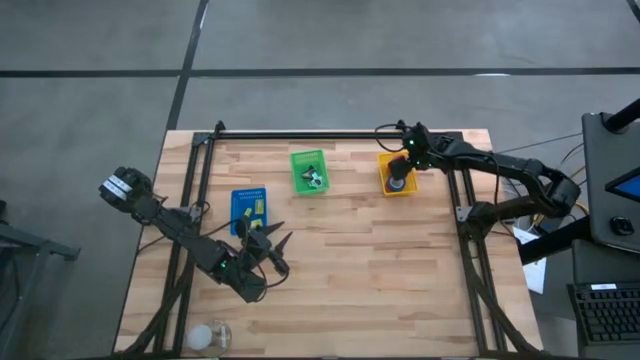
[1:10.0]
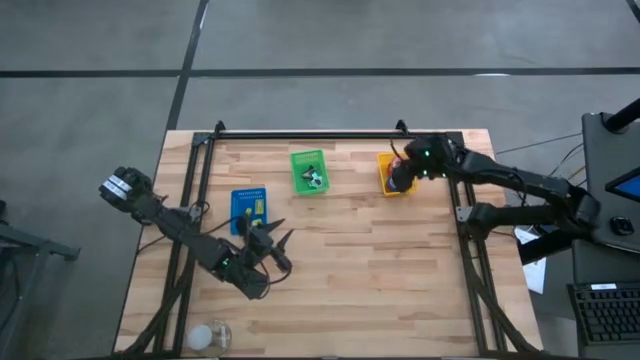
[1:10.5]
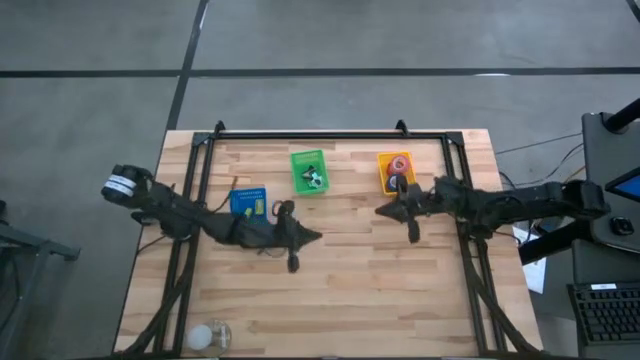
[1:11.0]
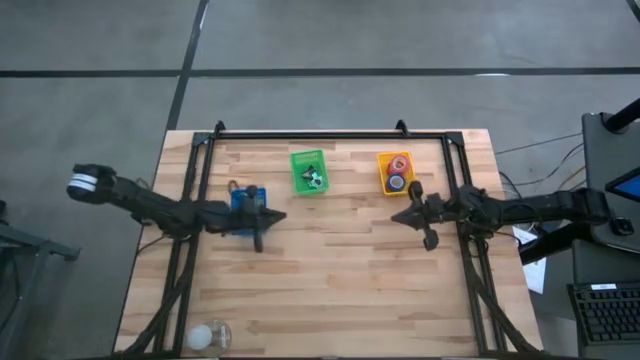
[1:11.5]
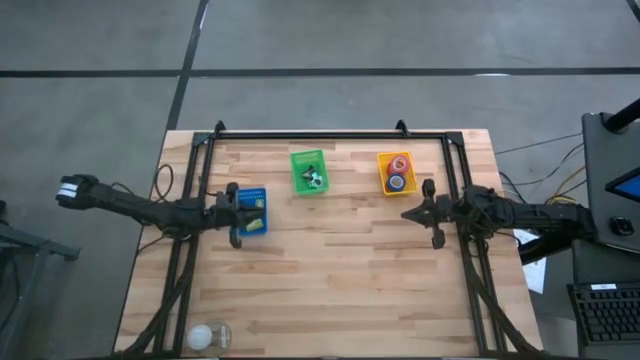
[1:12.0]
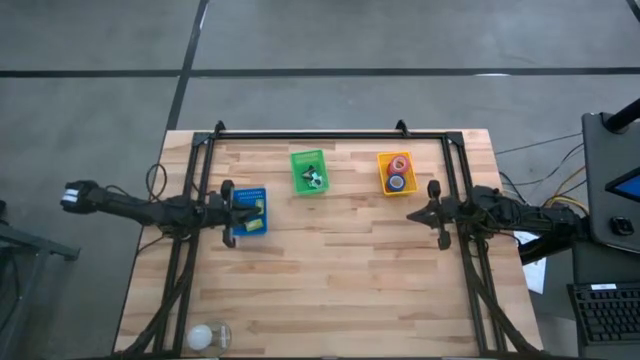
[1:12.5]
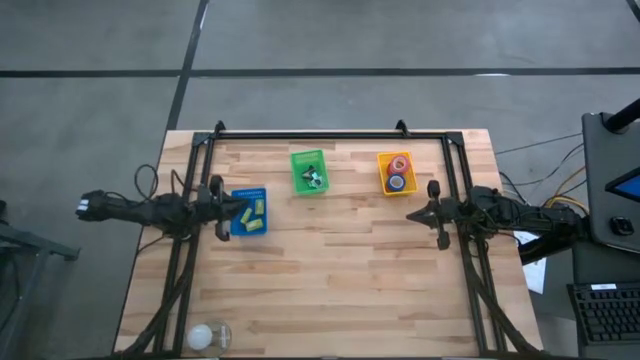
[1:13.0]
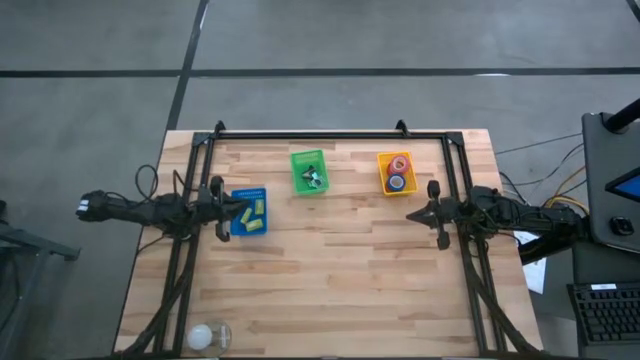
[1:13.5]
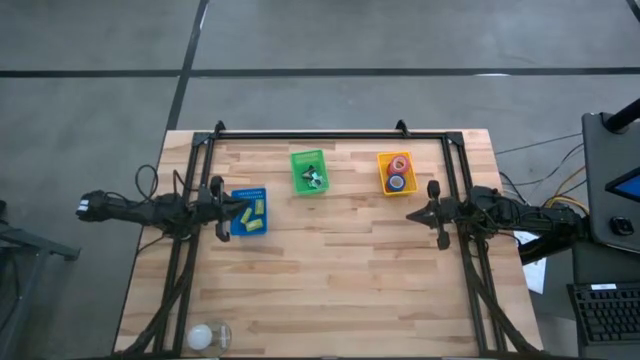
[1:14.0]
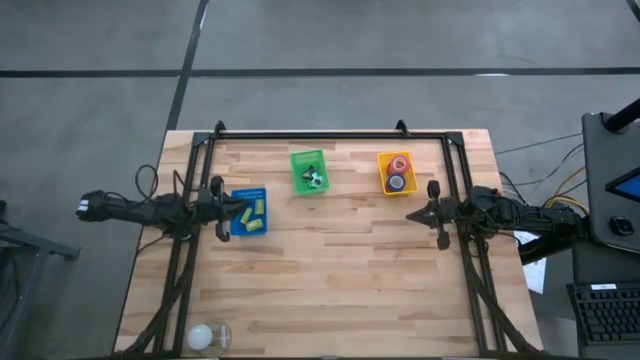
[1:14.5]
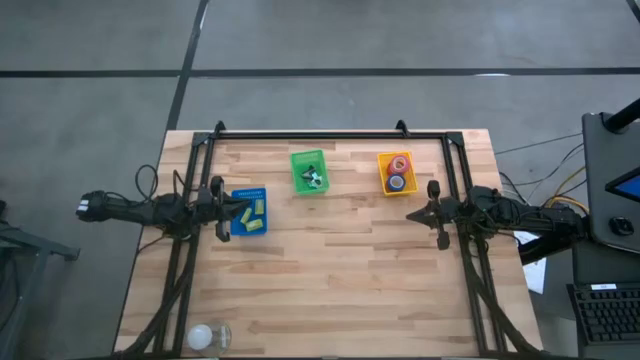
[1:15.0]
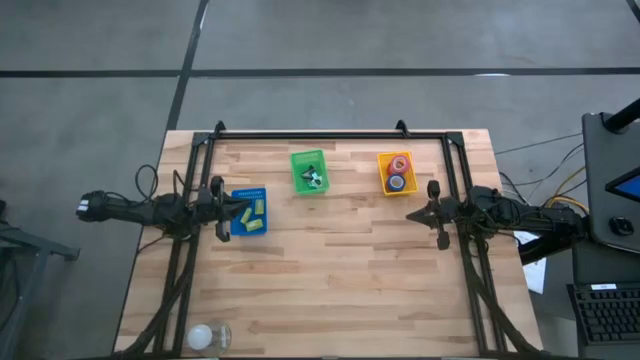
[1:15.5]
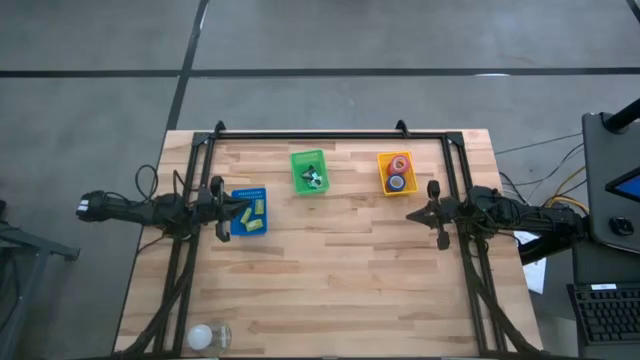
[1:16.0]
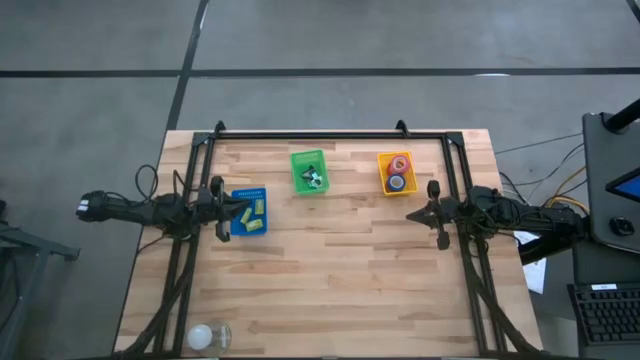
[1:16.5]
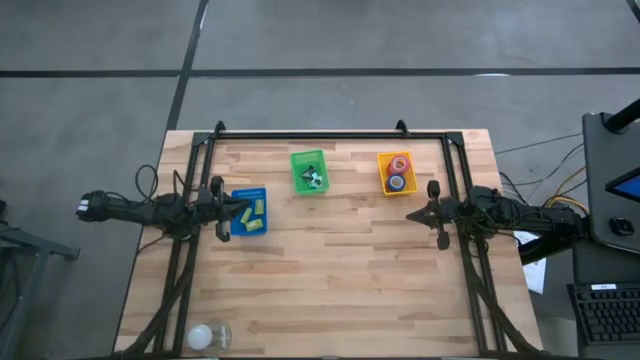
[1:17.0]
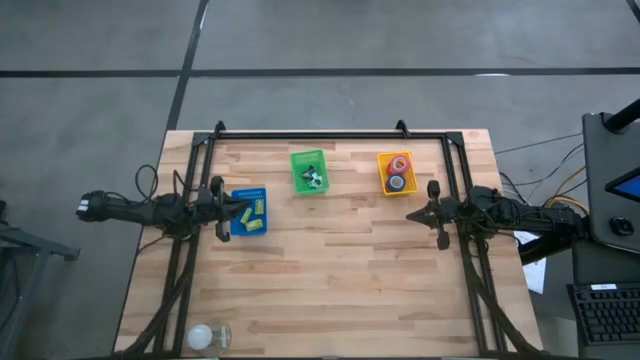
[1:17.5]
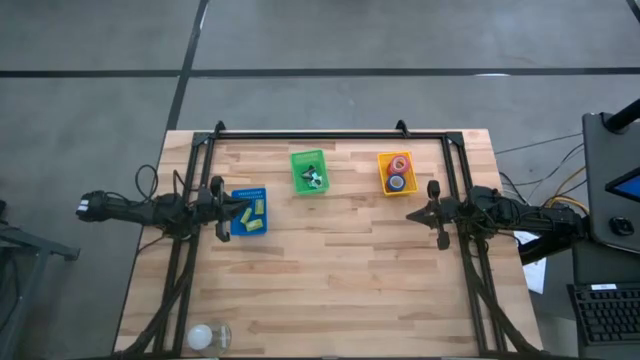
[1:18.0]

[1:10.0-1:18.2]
Task: Pick and place Stapler, Stapler remover, tape
Return to Home Position

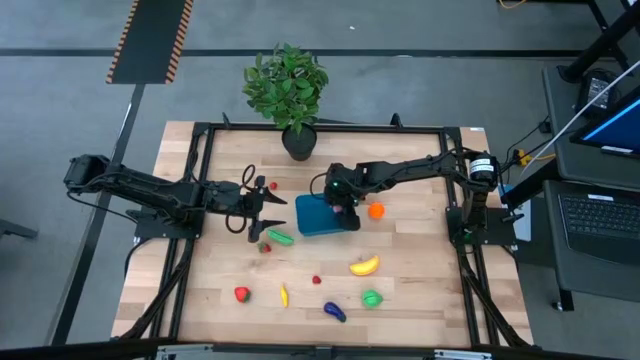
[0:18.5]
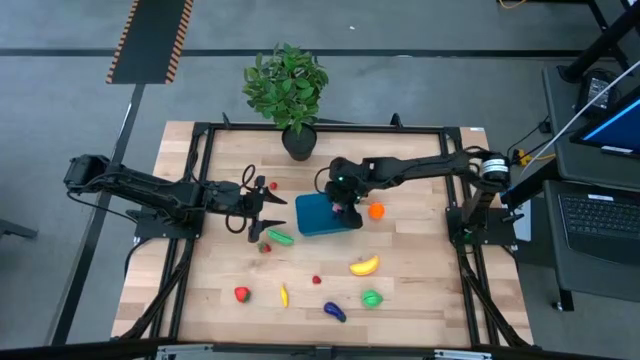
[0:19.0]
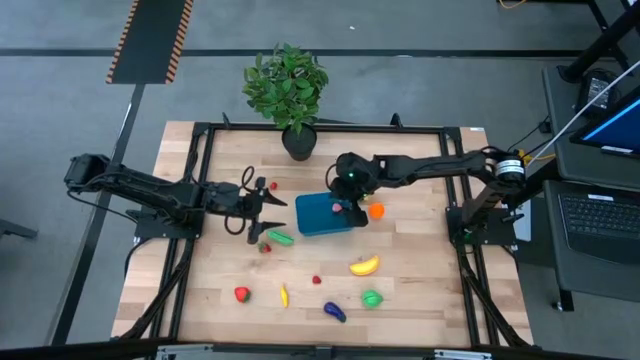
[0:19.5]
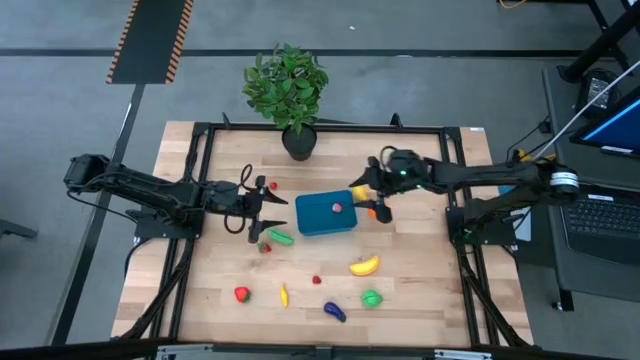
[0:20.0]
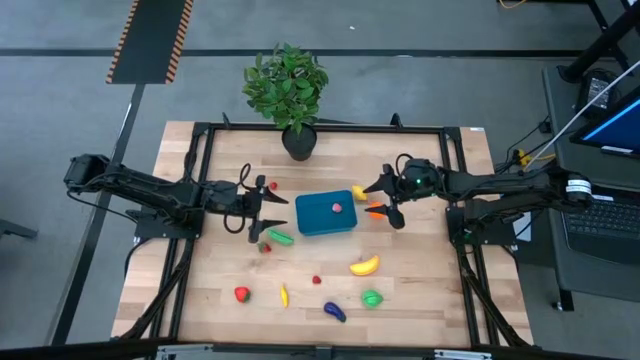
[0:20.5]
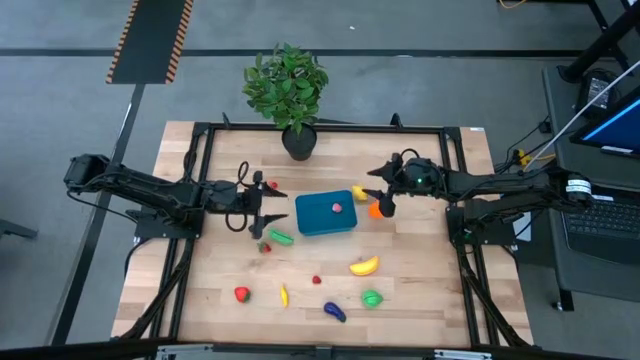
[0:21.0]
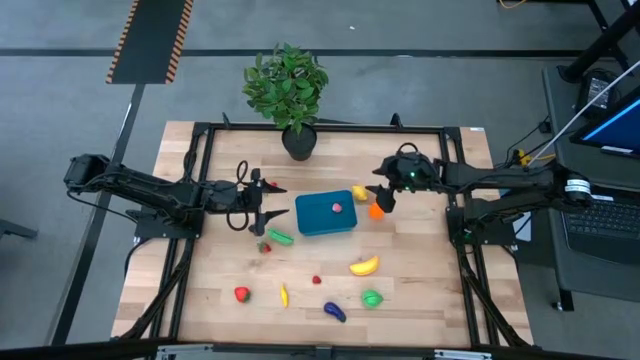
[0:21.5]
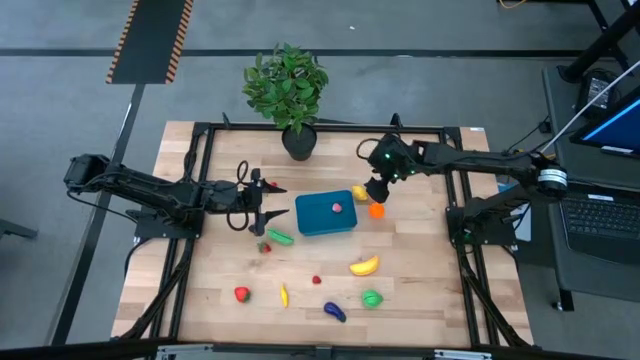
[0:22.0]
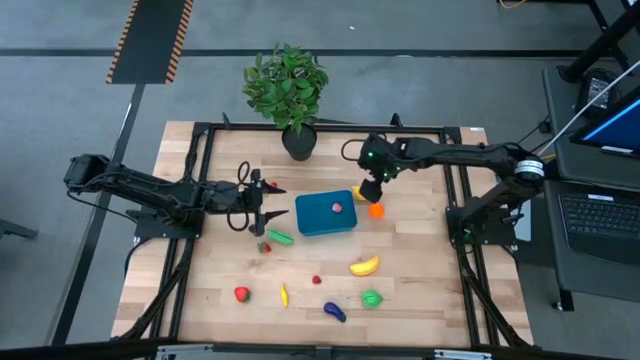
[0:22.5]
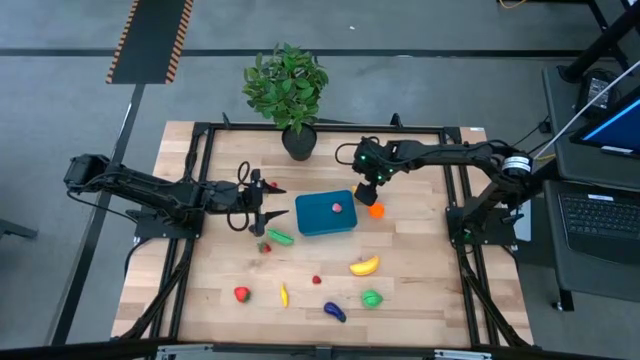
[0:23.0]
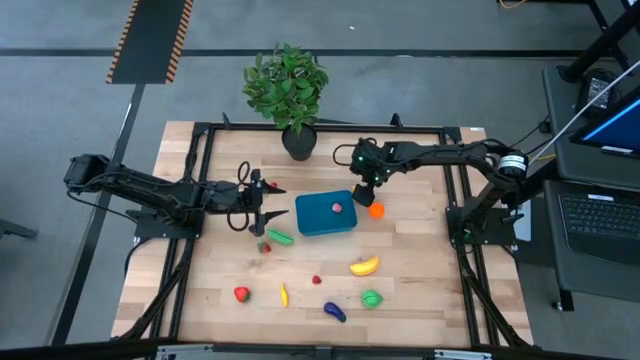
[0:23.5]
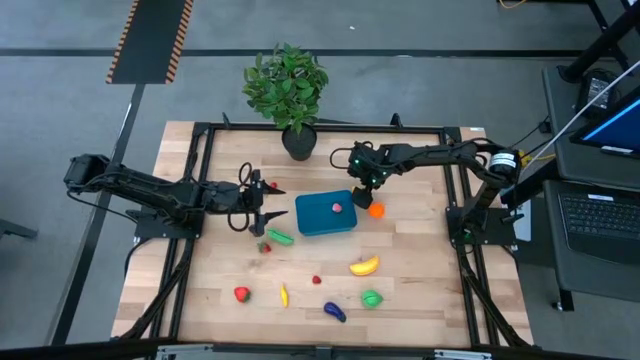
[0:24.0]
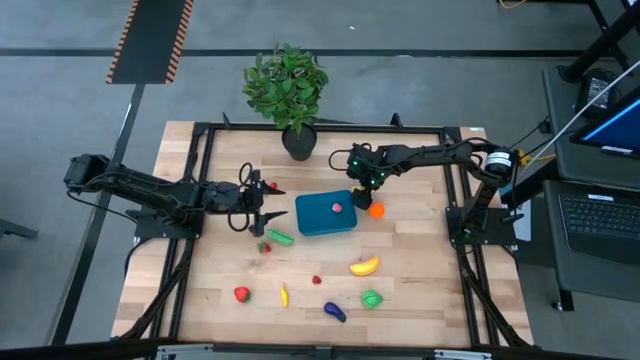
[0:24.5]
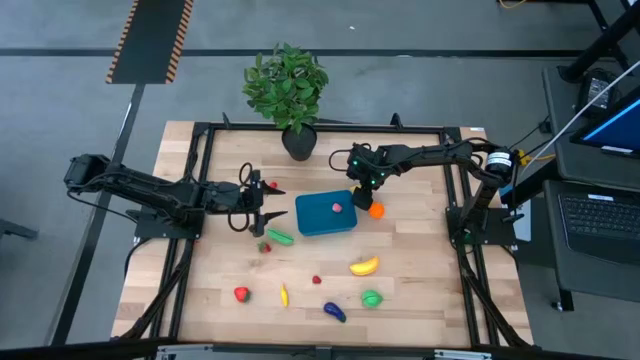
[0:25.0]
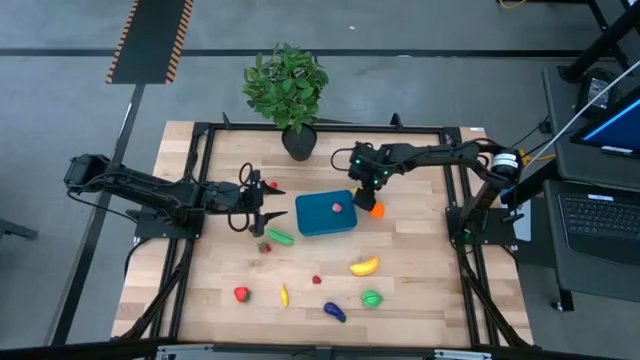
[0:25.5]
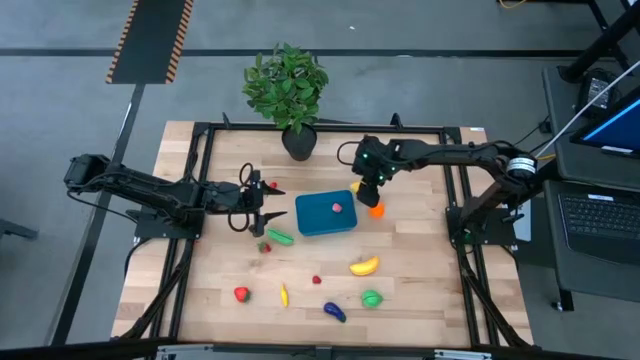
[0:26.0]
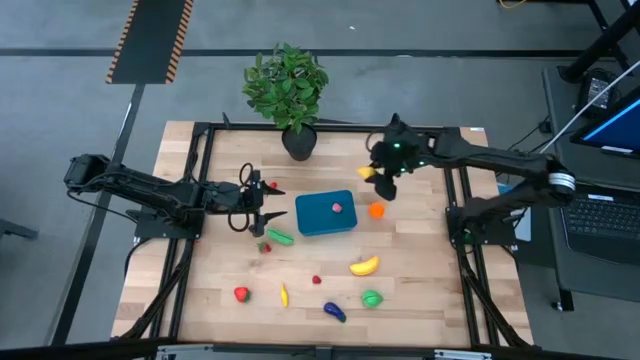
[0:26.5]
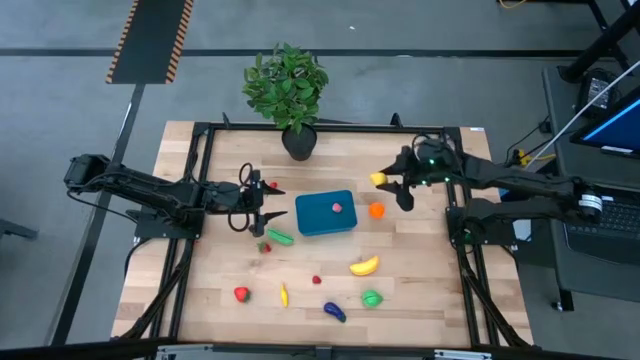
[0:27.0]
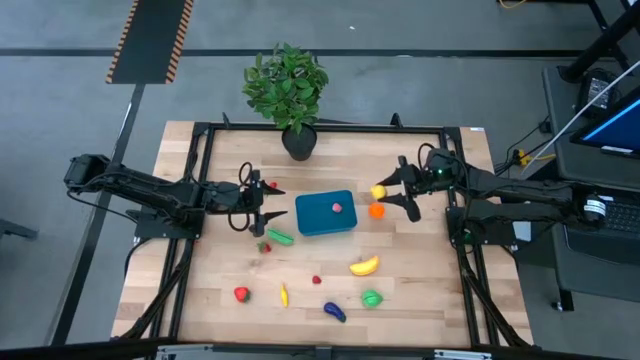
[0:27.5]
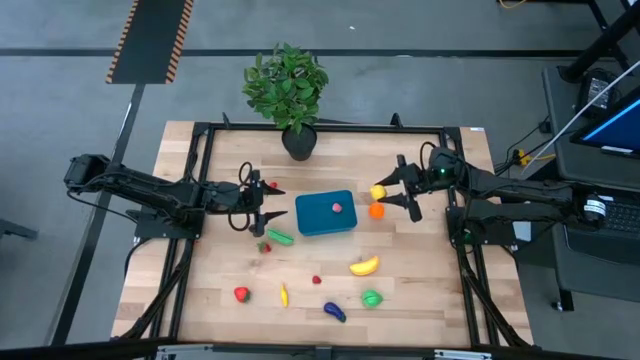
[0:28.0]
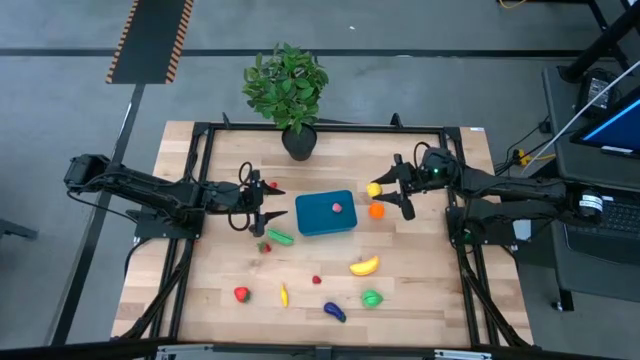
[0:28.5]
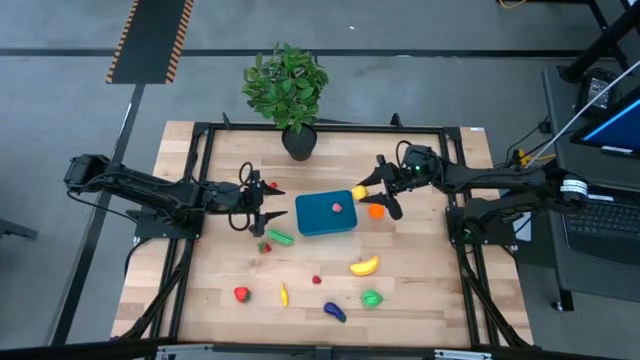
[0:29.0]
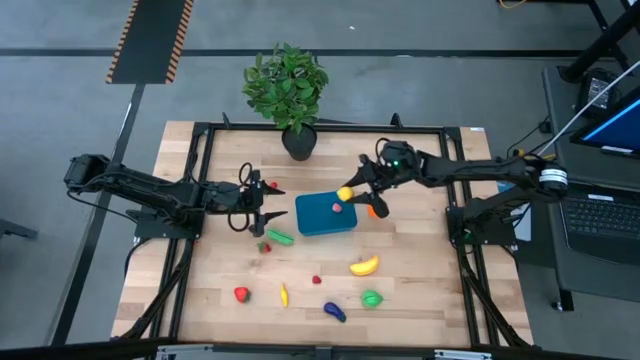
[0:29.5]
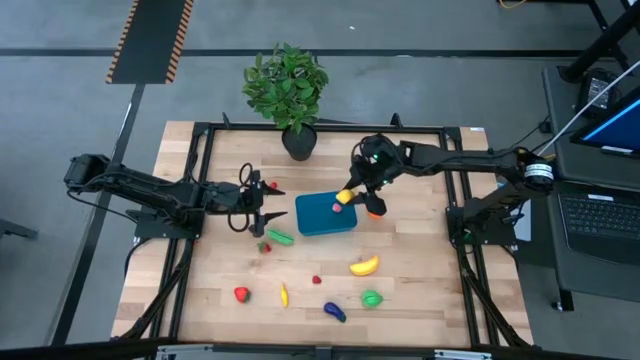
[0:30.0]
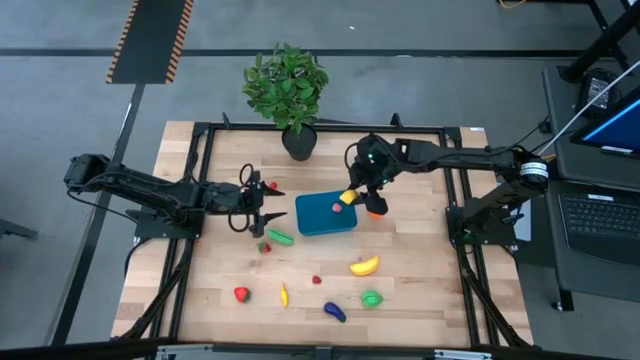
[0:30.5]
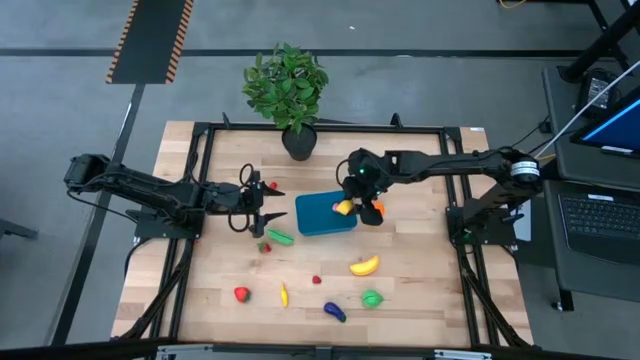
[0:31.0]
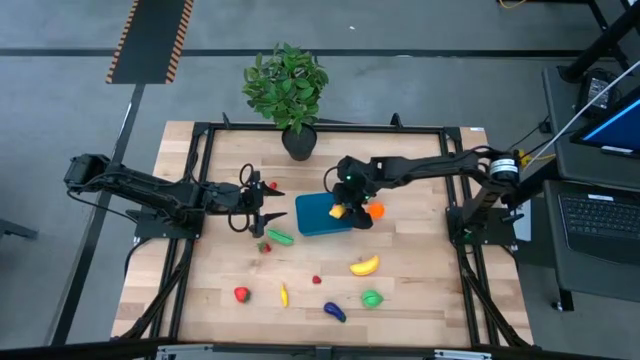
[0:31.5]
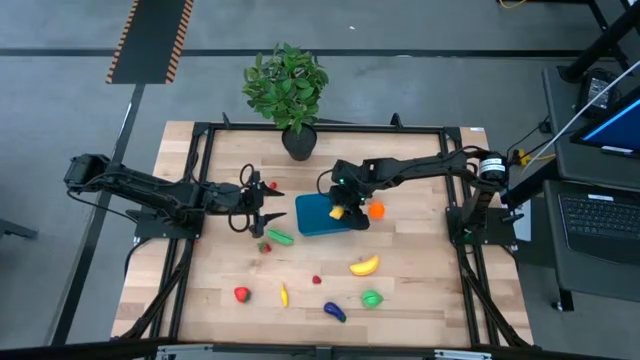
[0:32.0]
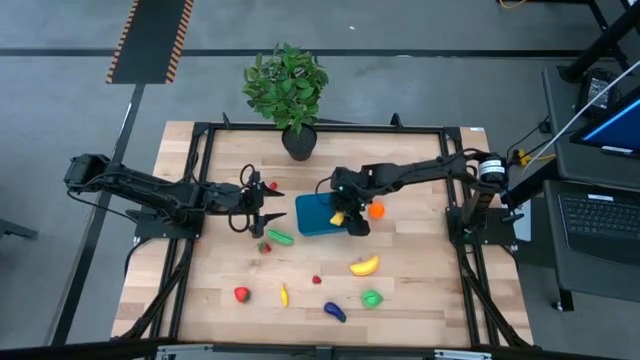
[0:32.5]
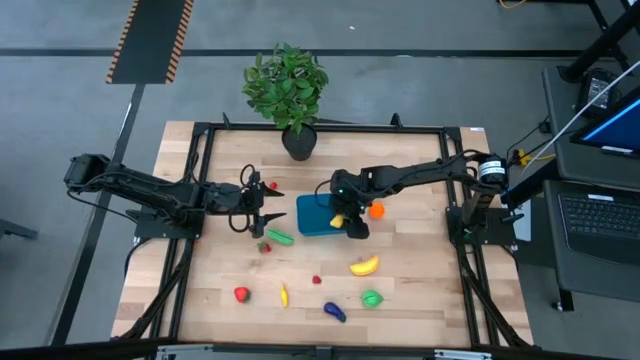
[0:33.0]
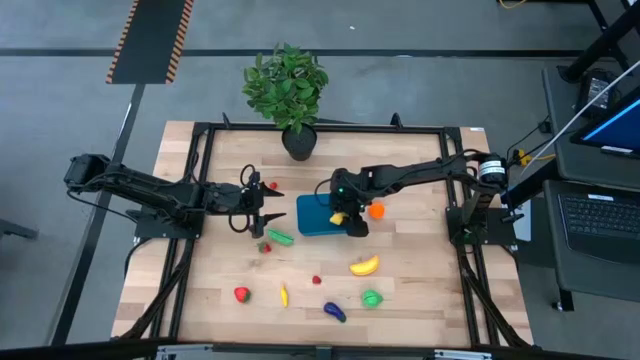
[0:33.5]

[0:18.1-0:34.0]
Task: Pick and placing Produce into tupperware
Put the yellow lemon into the blue bin
